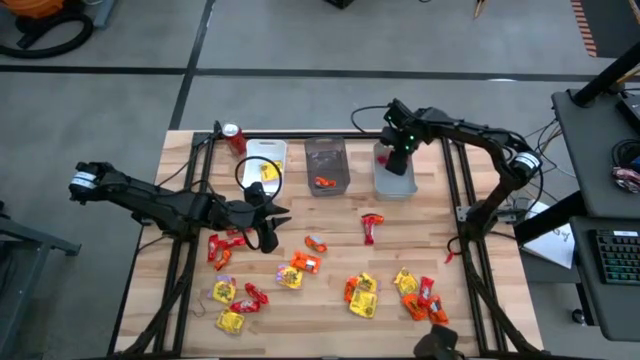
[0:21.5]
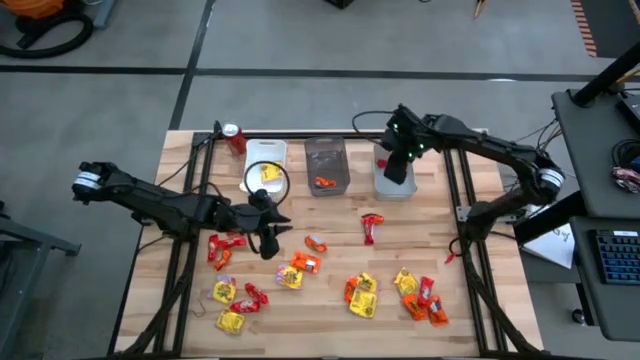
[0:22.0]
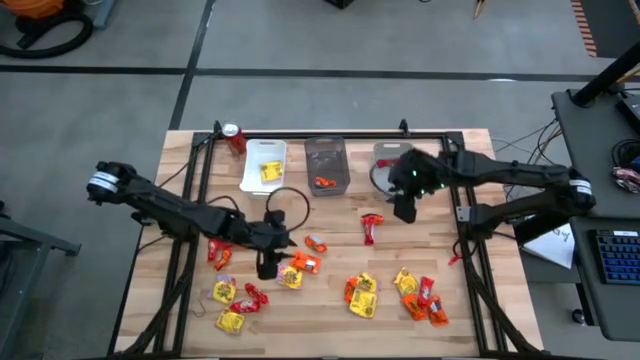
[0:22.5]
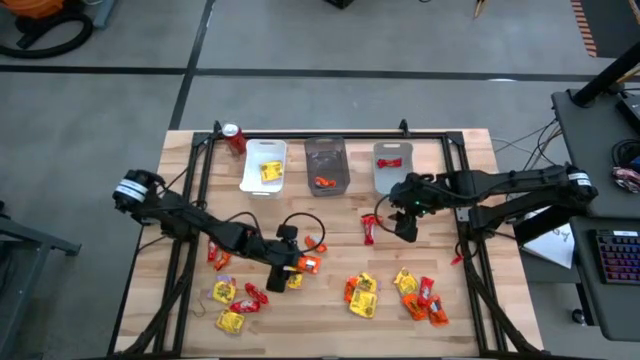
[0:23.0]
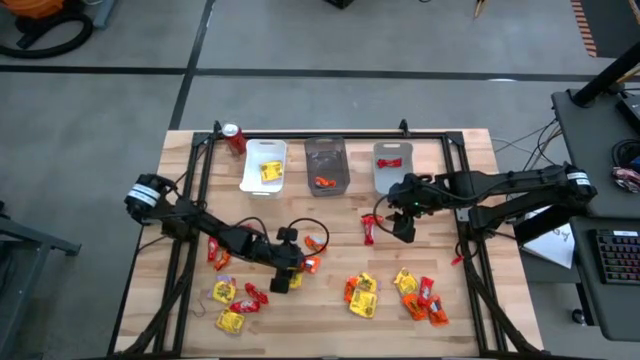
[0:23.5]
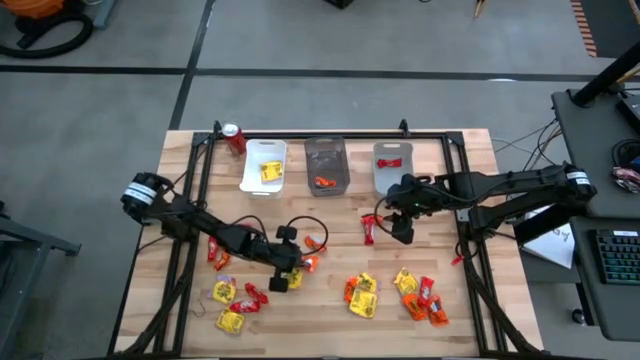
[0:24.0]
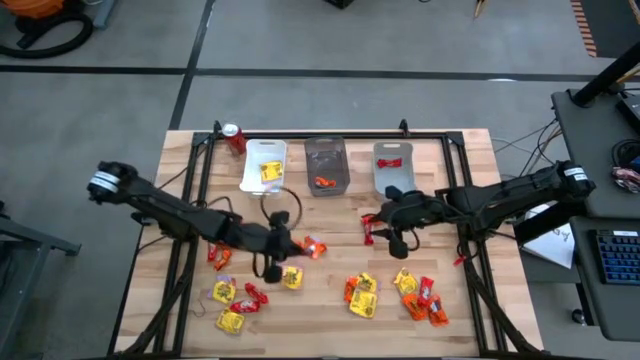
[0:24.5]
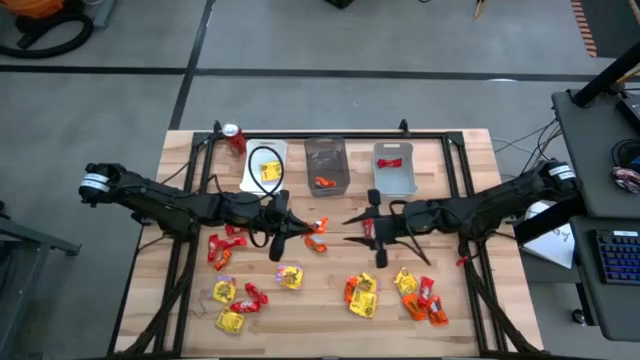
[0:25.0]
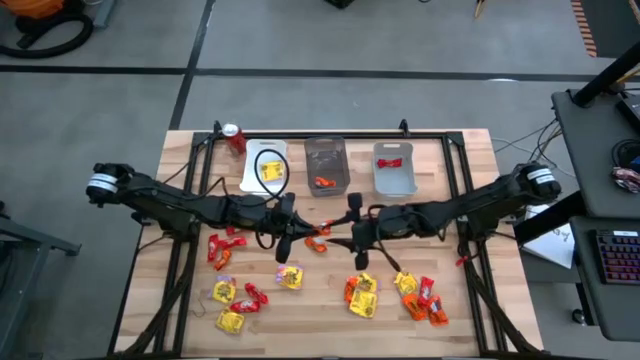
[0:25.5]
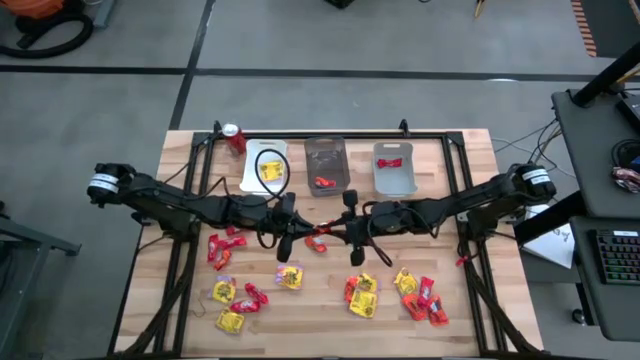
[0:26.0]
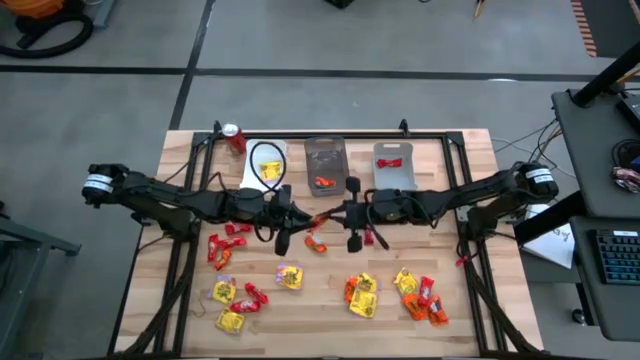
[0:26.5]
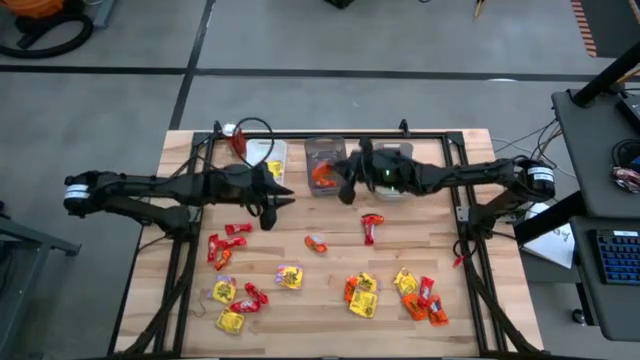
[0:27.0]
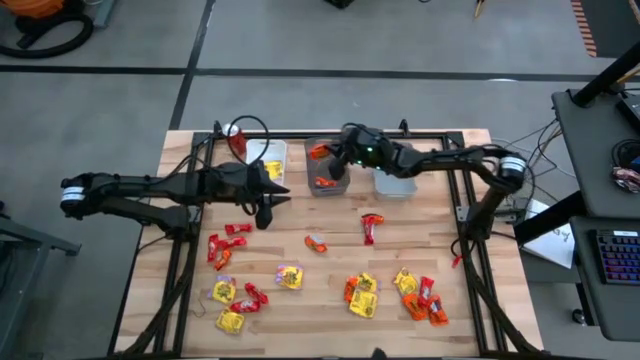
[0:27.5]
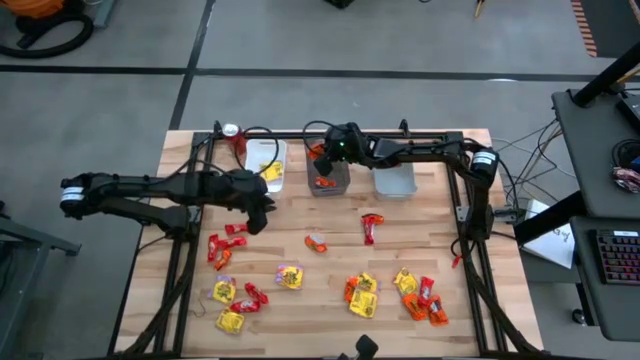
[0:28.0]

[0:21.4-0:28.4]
Task: Sort candy
Put the orange chocolate into the black bin

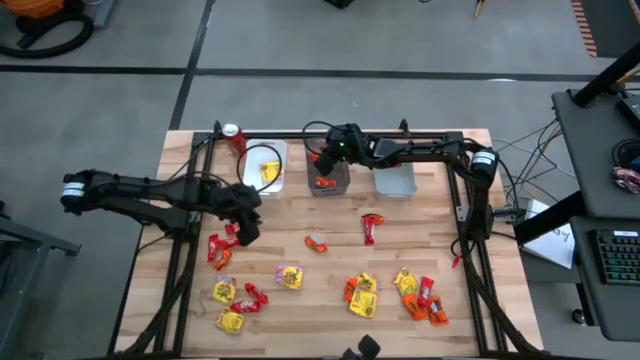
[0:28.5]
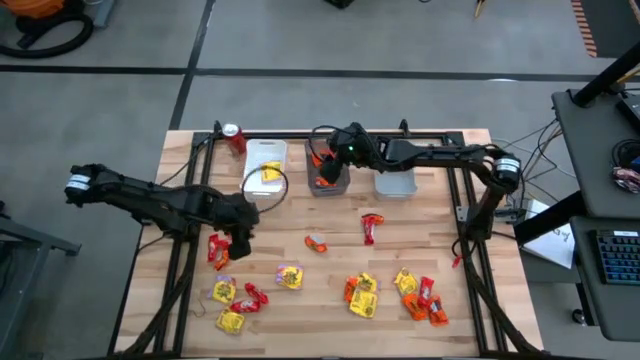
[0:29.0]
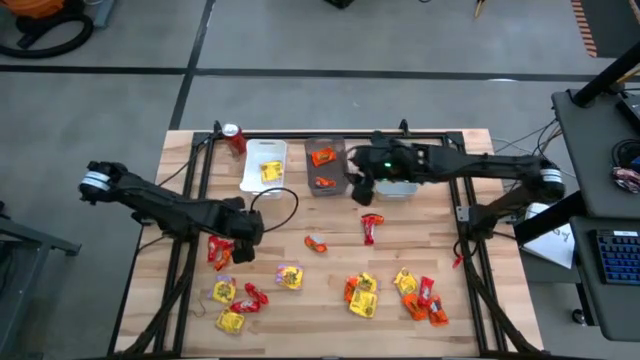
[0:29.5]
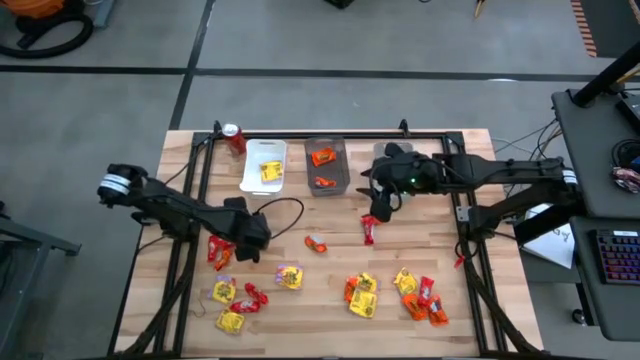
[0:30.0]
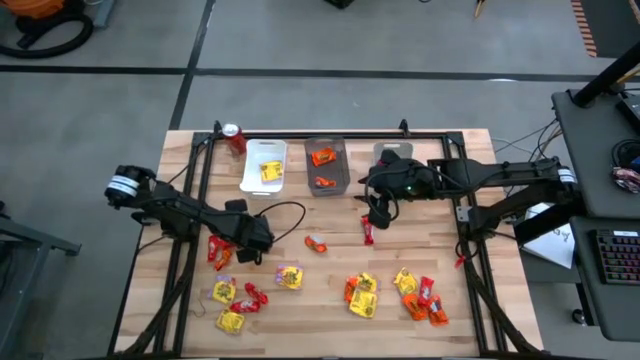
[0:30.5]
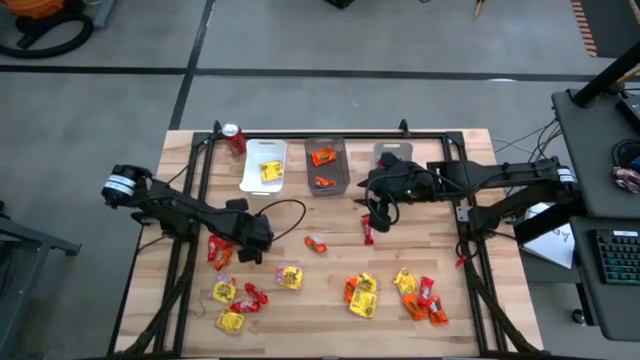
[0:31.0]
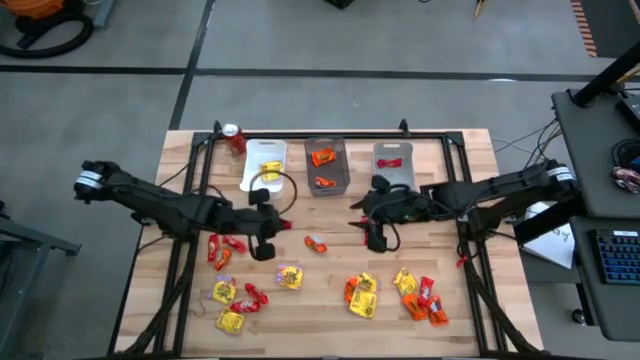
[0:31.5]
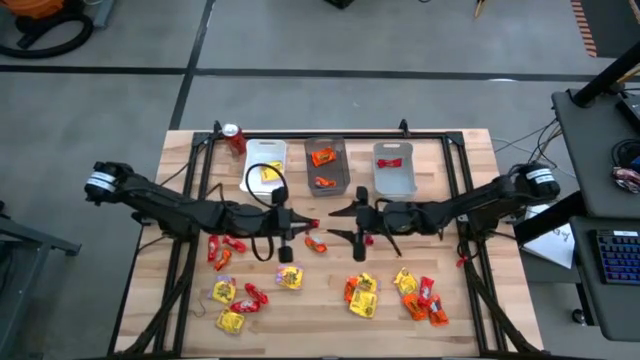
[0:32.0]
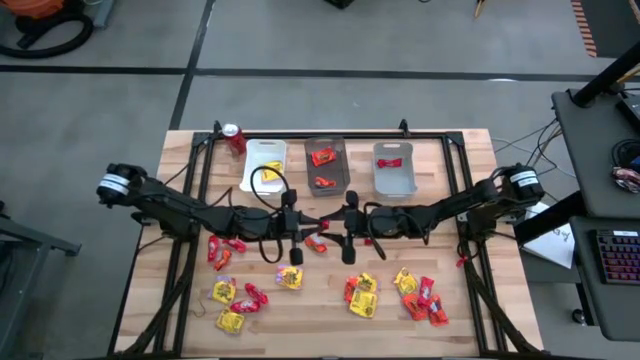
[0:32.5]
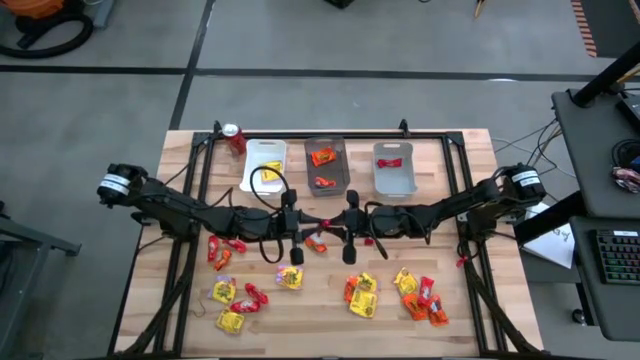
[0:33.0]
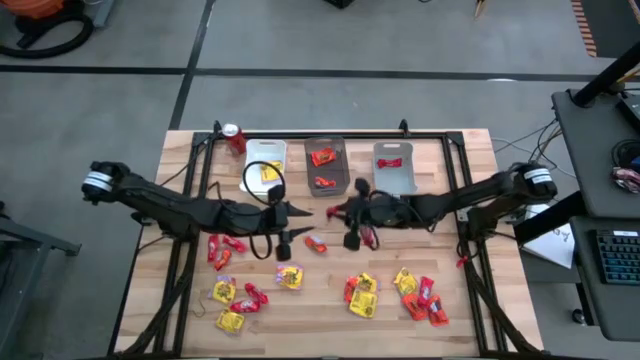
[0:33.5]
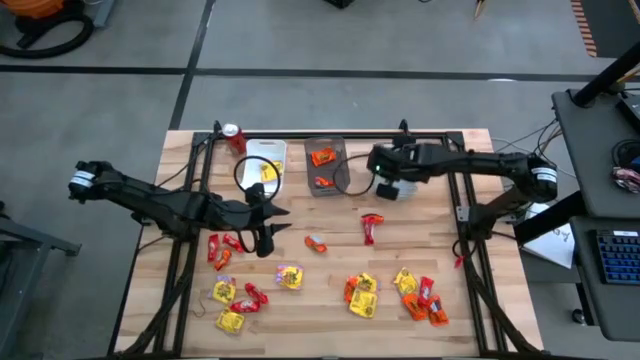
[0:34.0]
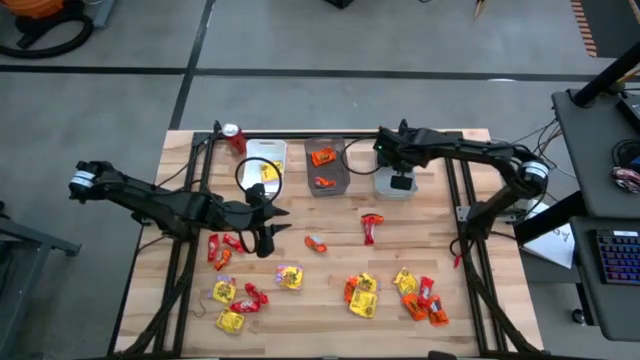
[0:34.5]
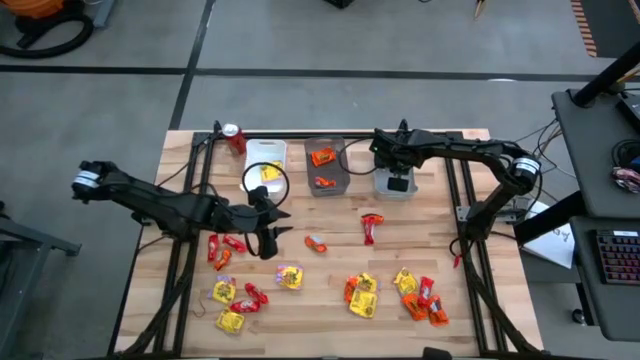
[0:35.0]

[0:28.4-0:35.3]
Put the red chocolate into the gray bin

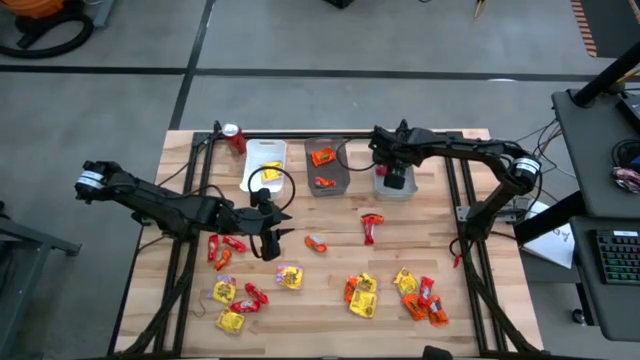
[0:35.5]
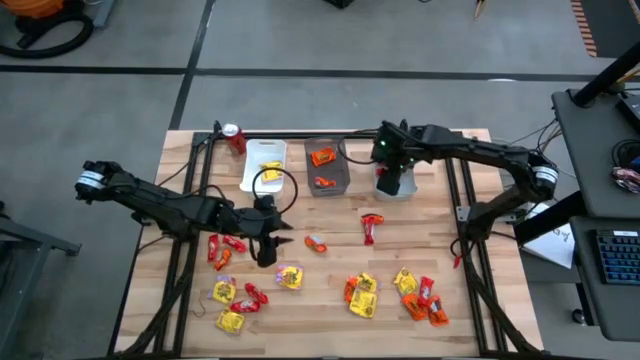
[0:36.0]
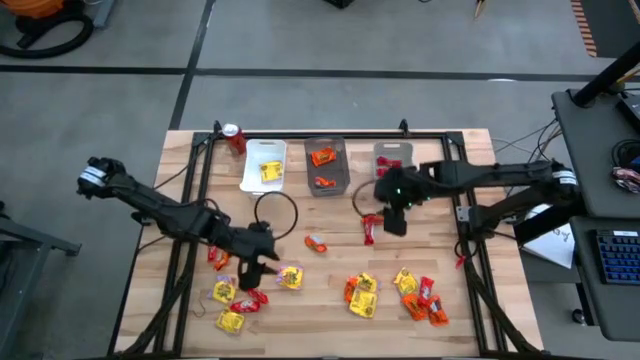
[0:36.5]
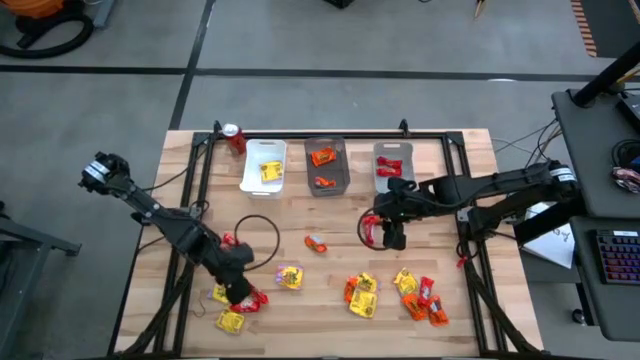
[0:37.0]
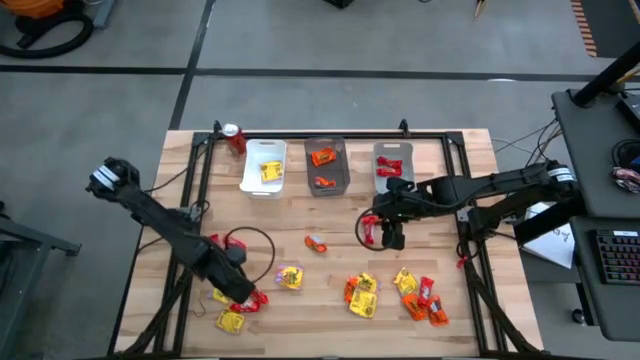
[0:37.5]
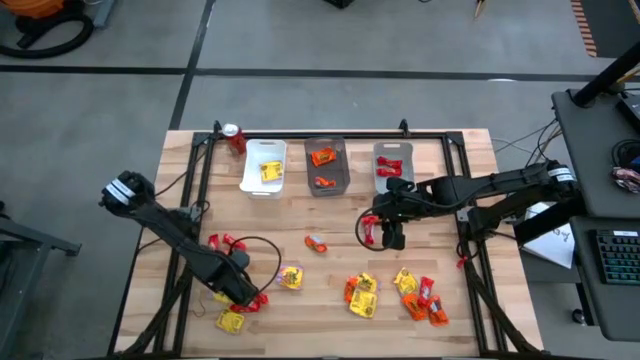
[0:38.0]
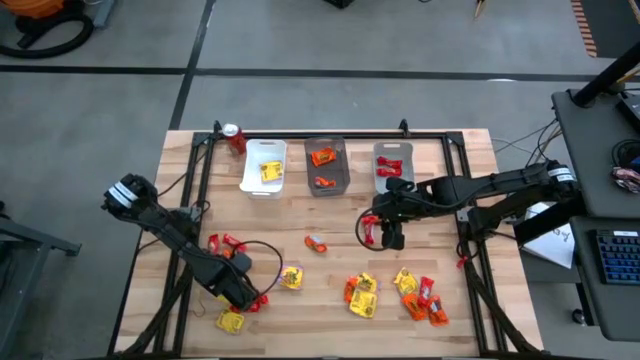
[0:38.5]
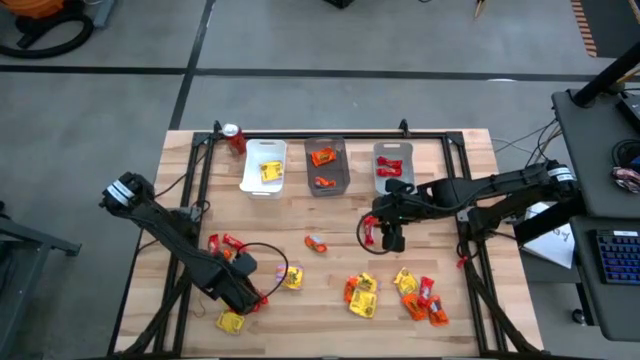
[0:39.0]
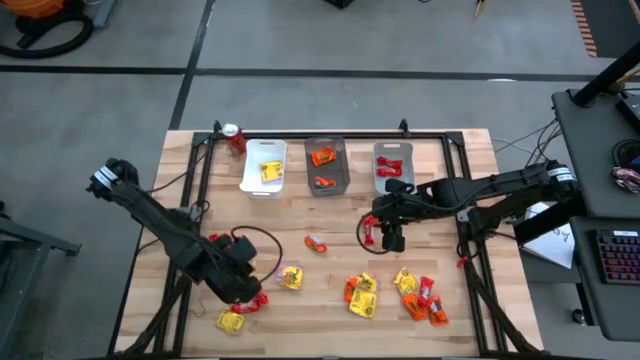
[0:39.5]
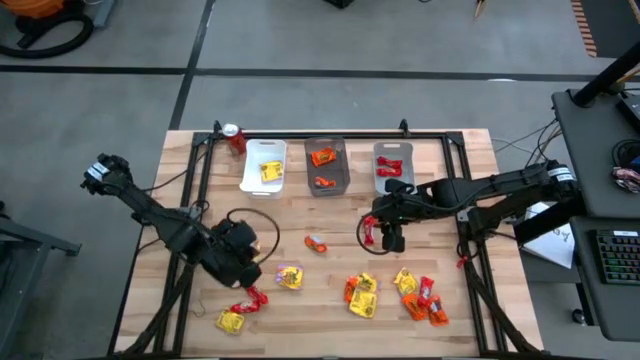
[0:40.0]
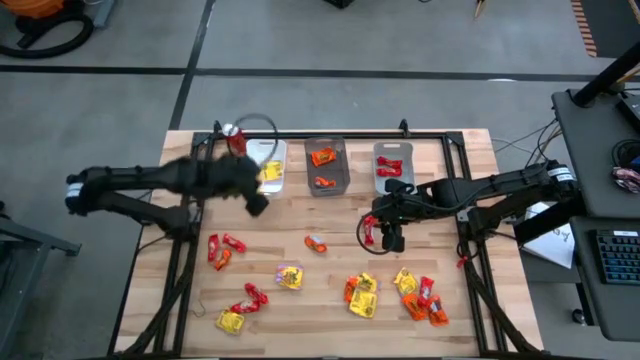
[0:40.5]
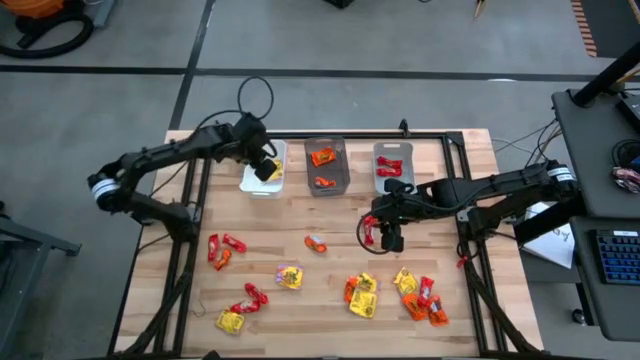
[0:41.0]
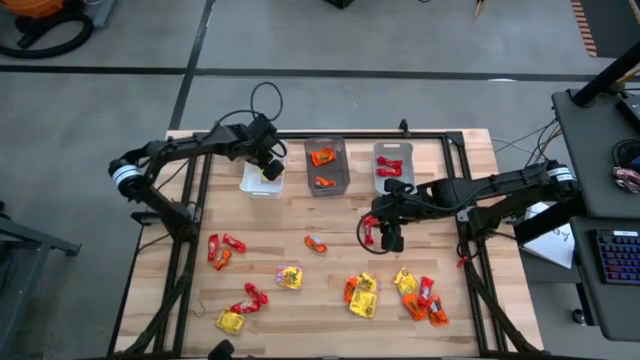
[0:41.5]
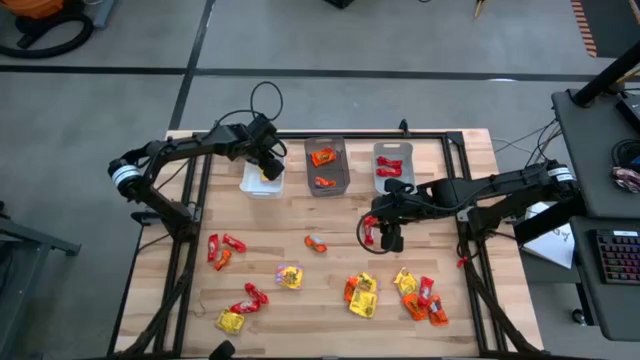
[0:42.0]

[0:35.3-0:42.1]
Put the yellow candy into the white bin
